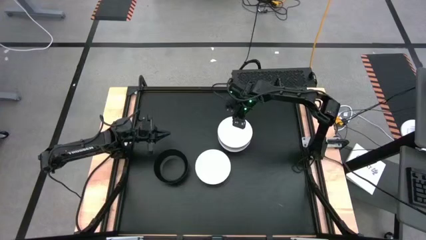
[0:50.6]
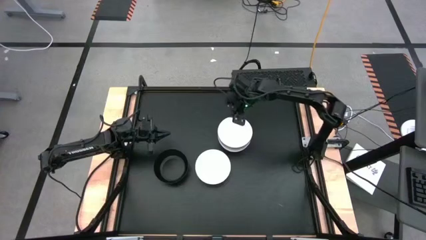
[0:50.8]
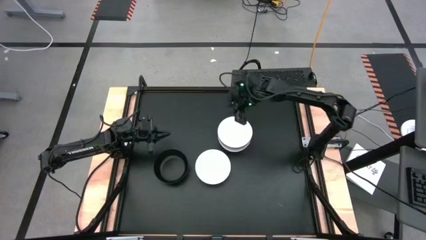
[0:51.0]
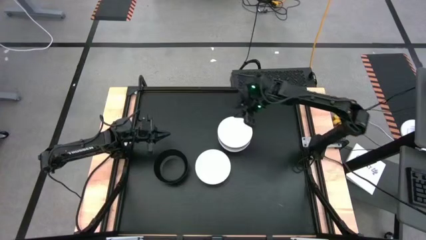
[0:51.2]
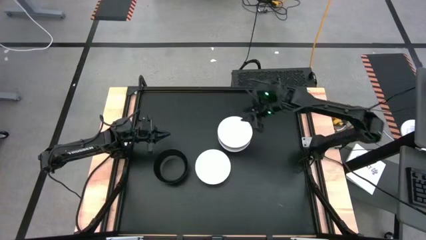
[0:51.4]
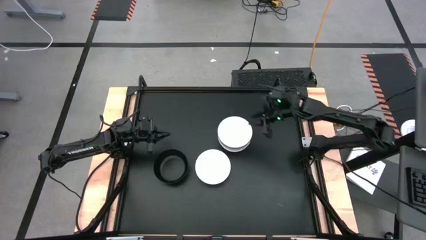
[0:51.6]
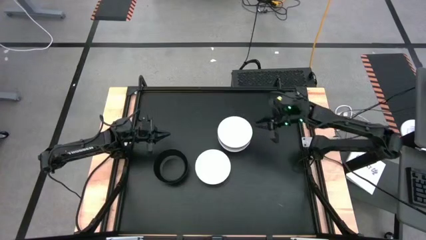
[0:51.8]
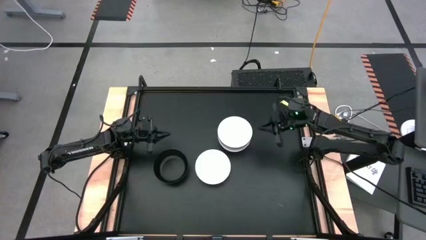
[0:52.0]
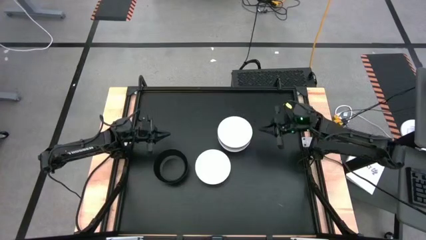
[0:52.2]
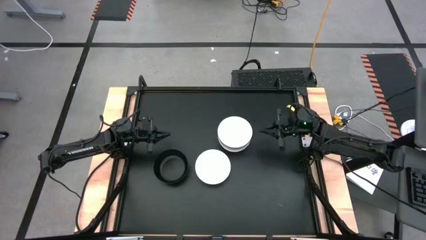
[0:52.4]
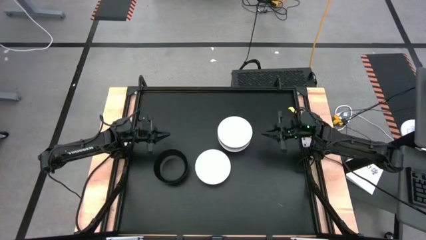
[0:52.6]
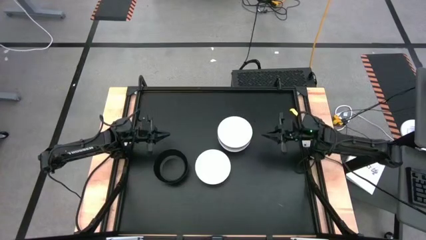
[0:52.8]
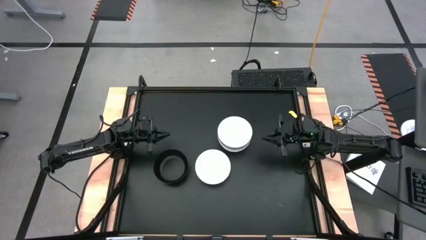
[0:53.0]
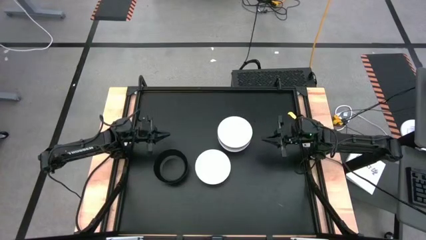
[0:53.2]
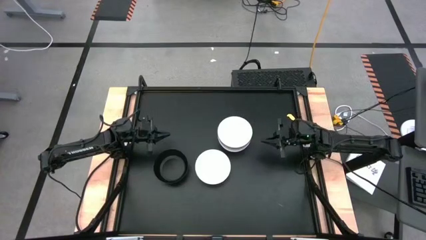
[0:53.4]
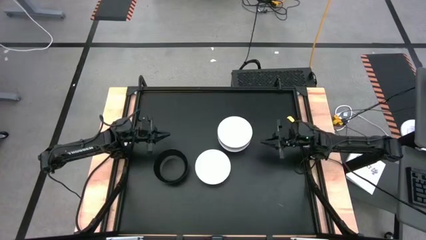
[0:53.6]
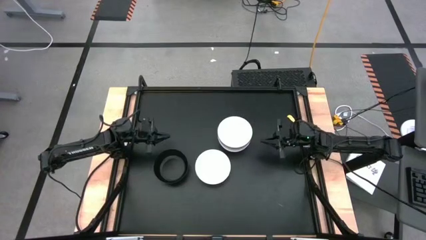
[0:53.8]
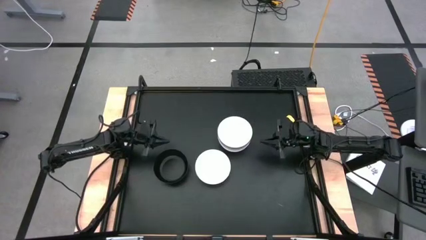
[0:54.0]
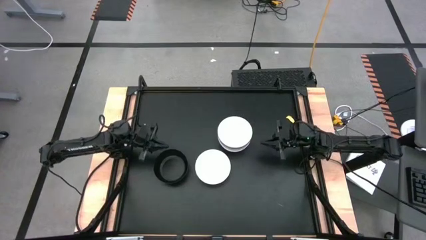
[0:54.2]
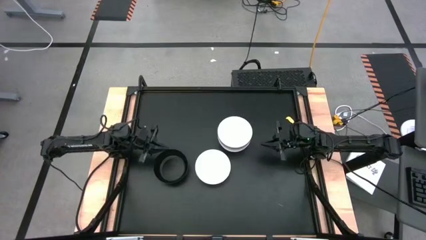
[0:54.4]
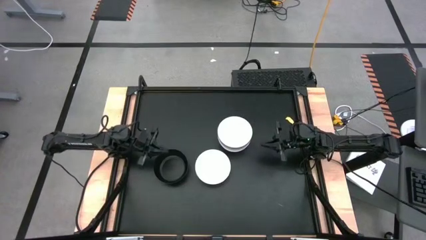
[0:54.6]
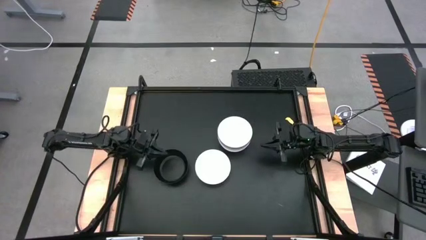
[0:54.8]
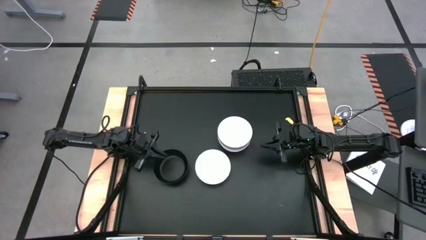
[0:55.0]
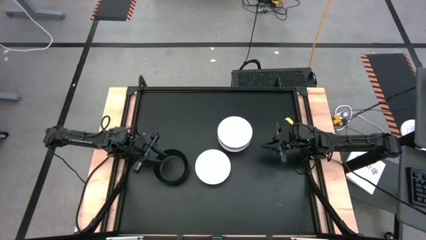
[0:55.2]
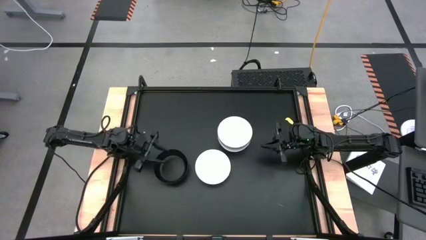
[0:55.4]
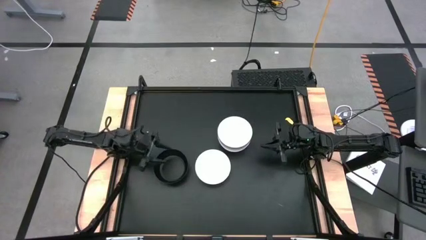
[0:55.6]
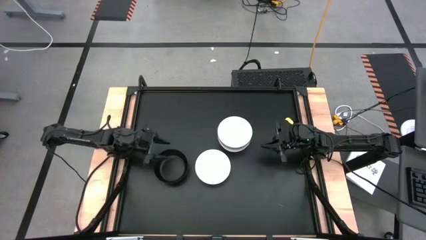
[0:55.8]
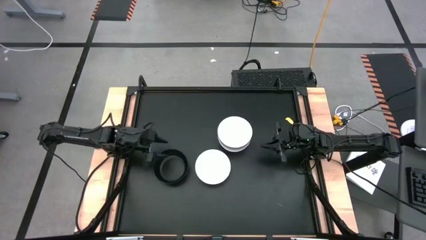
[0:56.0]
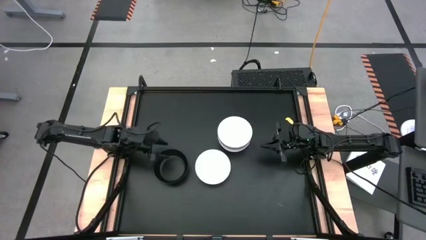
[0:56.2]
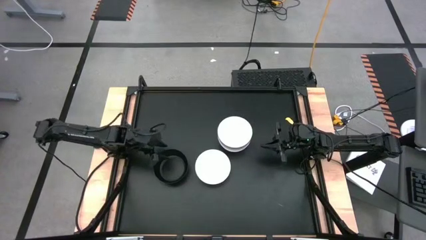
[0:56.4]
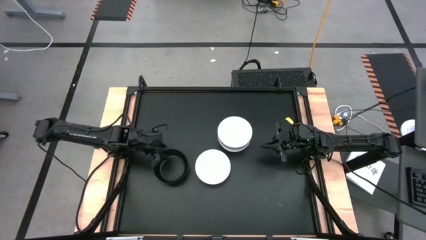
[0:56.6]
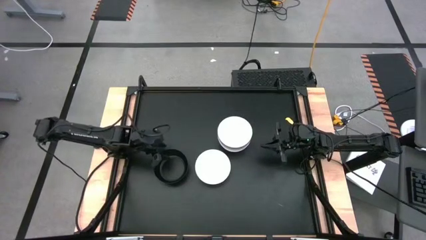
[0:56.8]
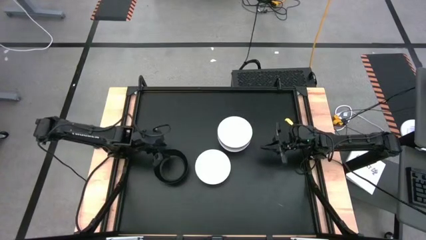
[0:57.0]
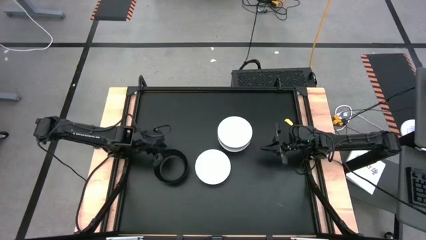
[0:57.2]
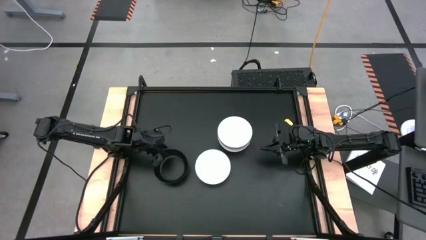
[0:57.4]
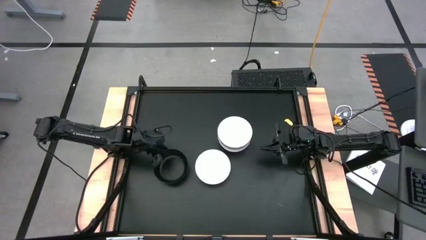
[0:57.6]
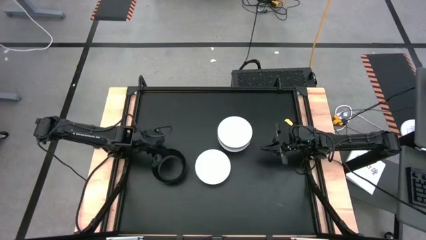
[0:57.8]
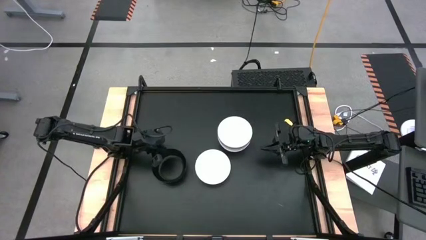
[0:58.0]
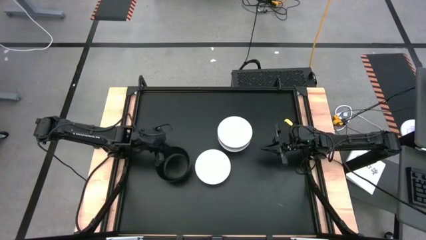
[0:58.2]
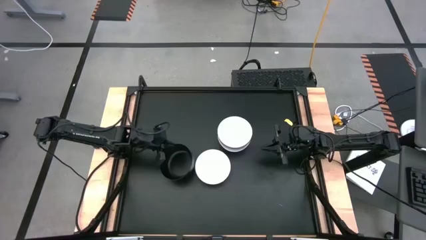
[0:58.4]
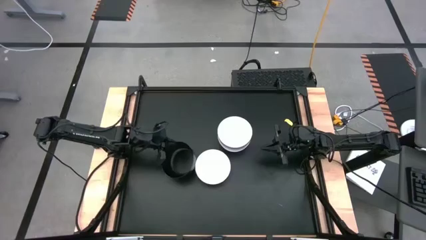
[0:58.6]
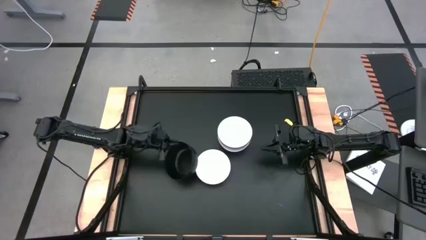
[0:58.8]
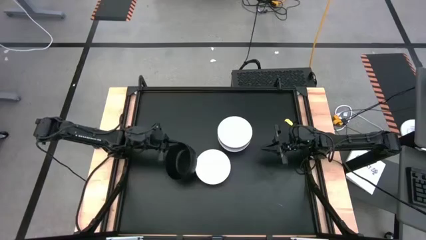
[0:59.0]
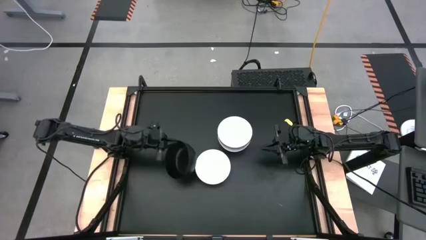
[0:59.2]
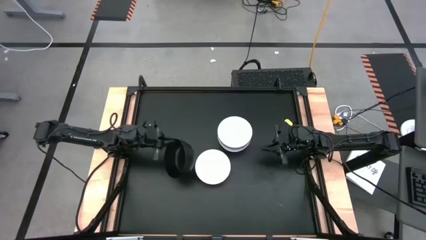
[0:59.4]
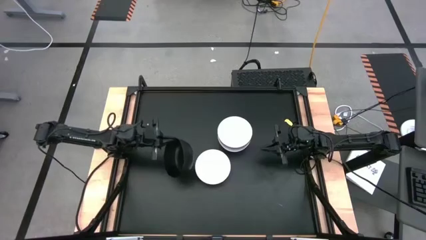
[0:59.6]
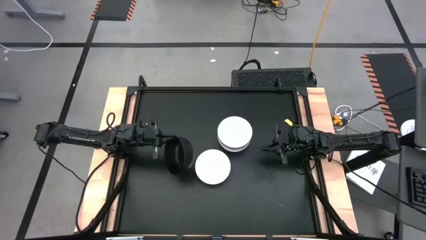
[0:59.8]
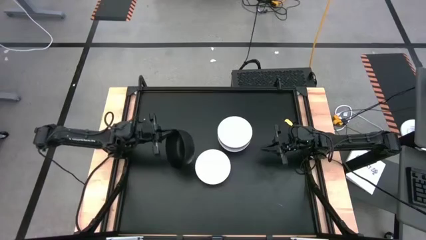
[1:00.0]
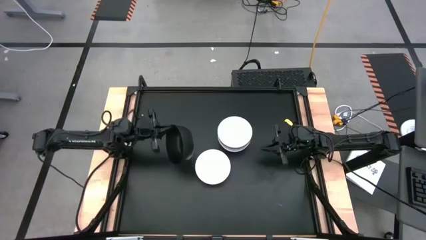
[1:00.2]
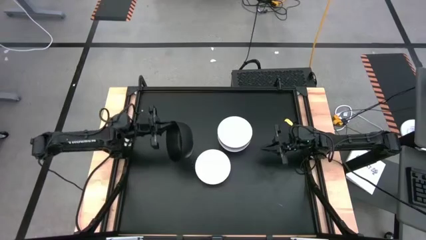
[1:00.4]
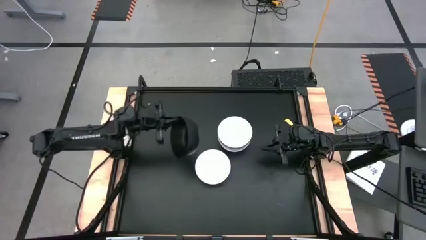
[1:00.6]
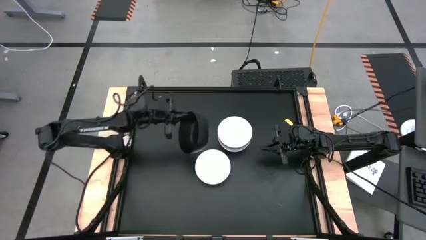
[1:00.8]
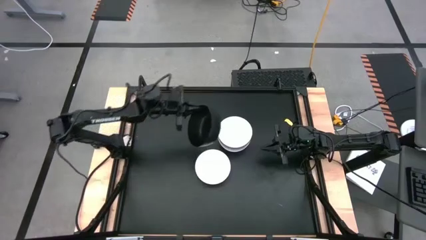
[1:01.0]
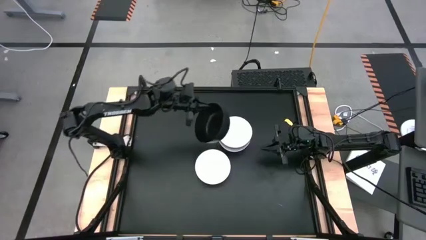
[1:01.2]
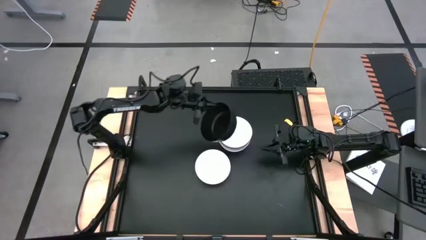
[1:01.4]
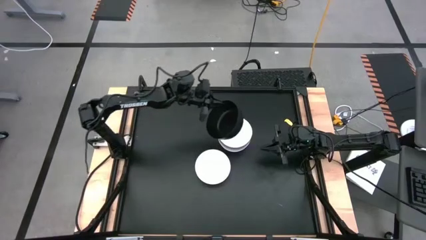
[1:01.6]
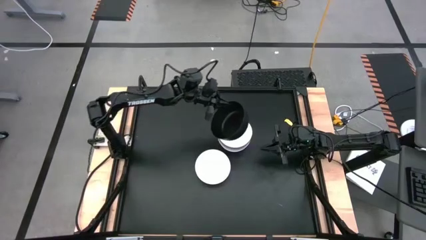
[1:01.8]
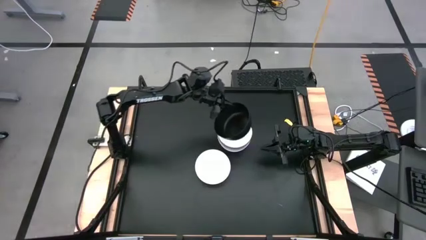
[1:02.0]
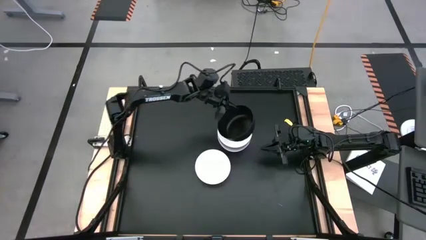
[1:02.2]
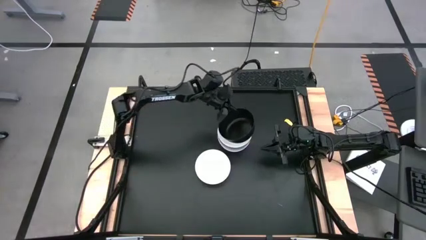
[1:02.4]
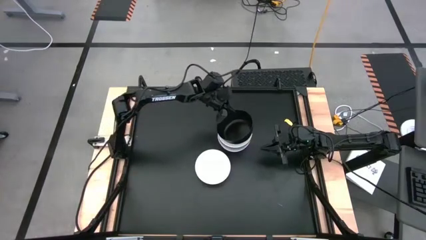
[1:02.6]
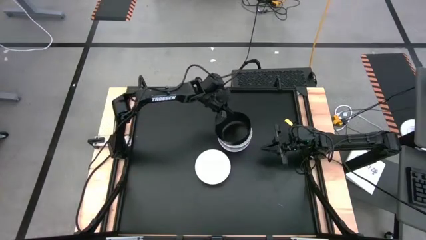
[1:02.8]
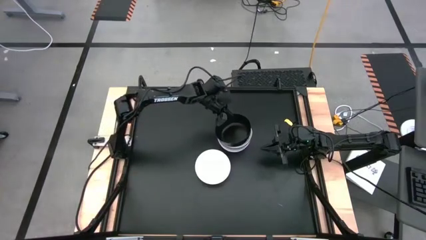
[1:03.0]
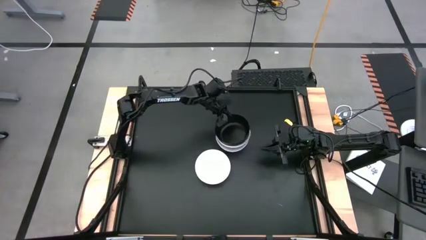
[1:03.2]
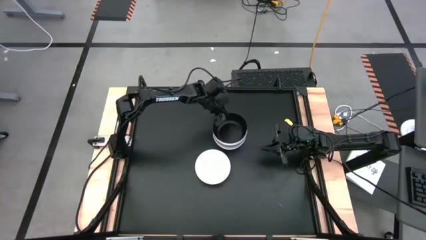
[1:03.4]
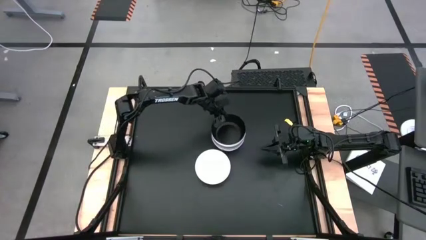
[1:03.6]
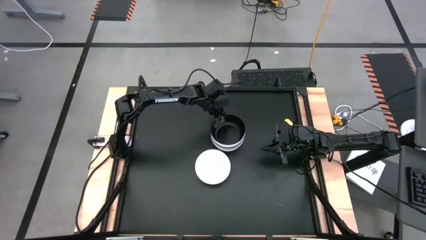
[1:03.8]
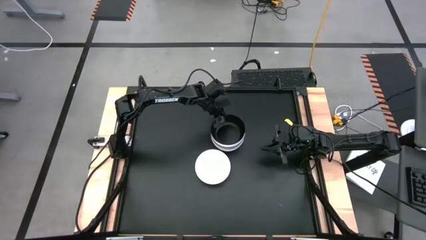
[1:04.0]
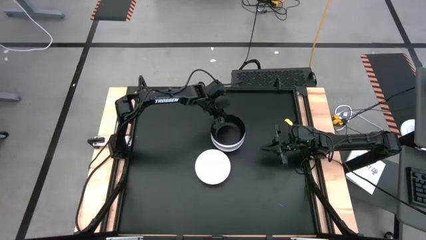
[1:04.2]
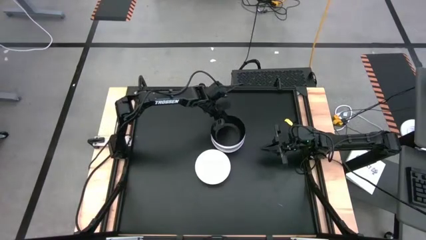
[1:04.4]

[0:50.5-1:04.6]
Task: Nest bowls inside each other
Stack the black bowl on top of the white bowl
